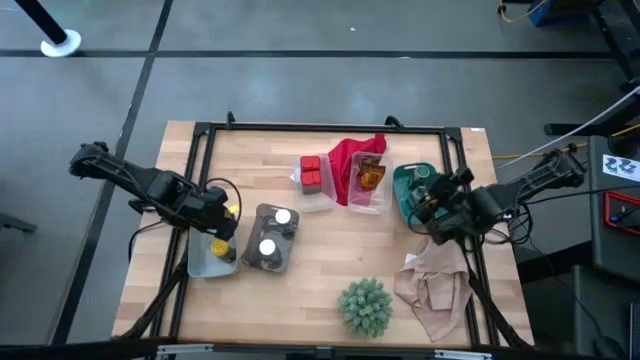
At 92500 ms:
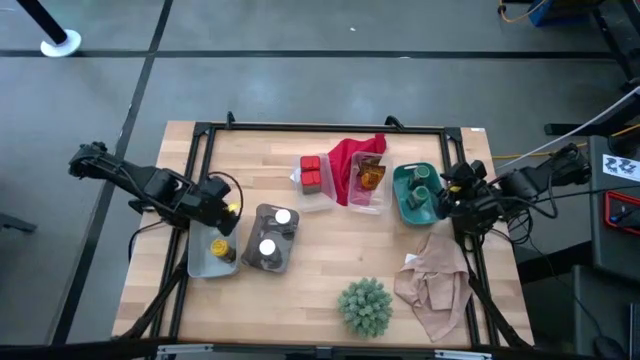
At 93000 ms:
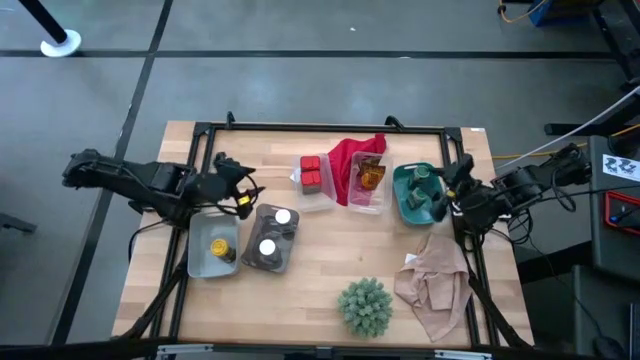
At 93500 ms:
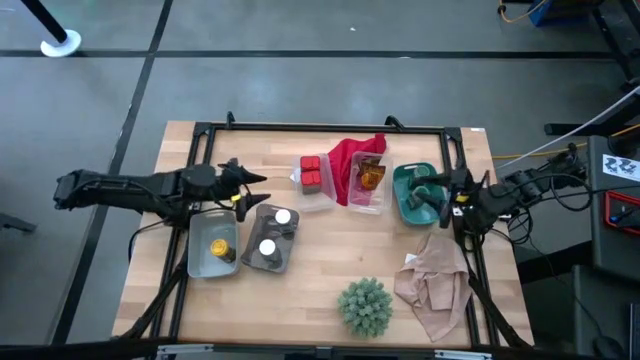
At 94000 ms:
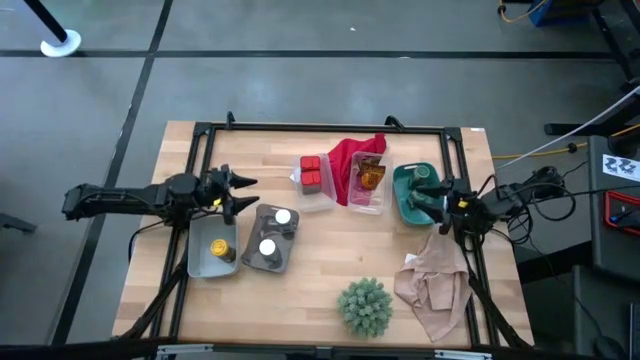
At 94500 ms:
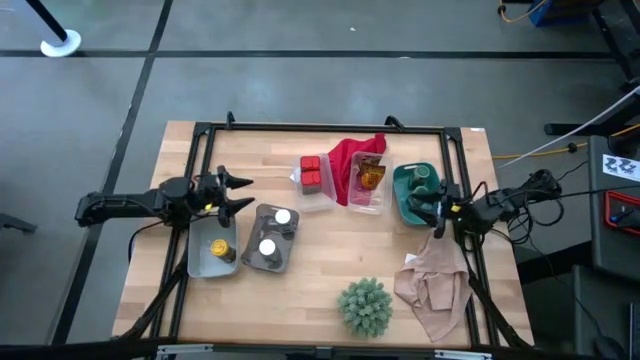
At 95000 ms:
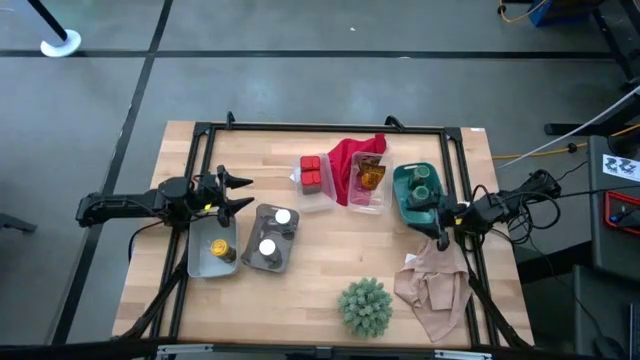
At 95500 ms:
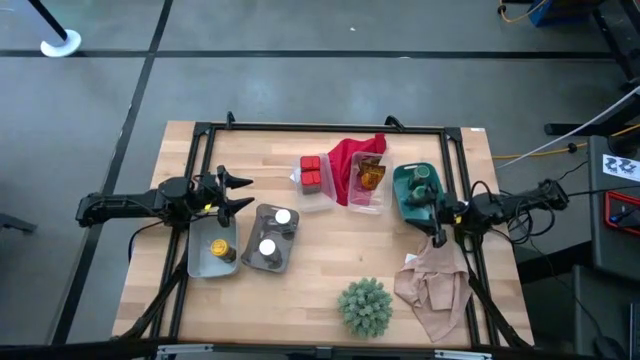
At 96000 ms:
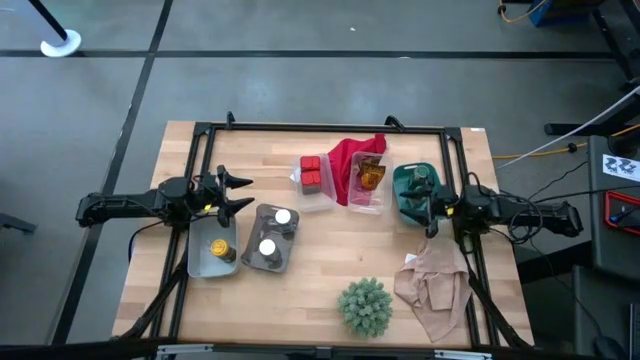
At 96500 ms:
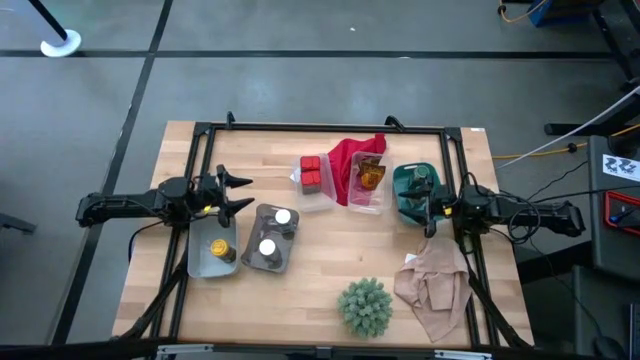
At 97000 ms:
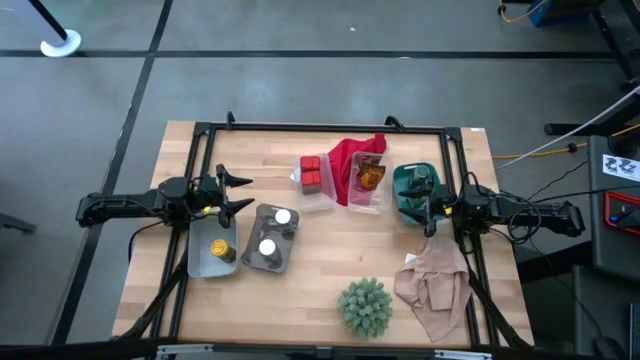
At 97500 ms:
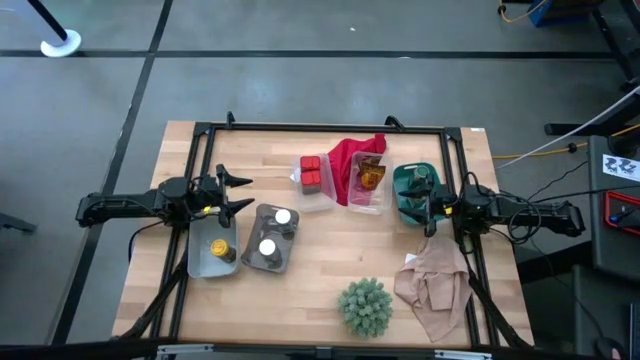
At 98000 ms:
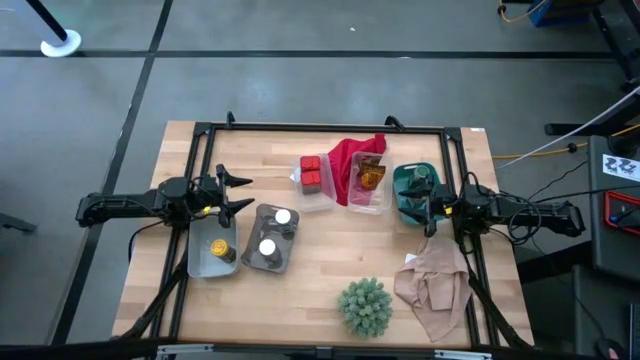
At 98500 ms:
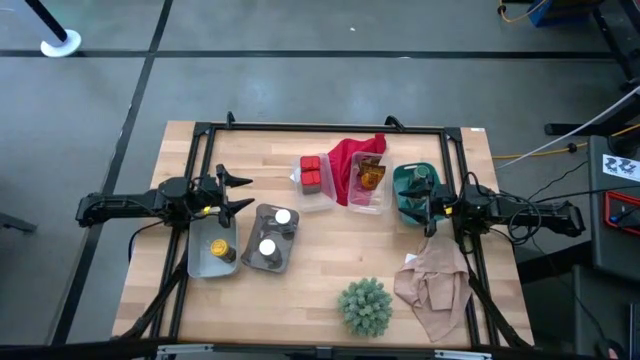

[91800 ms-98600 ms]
Task: Sort spices by type
Return to Home Position

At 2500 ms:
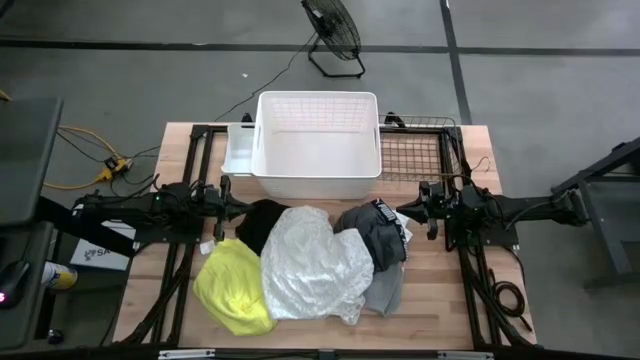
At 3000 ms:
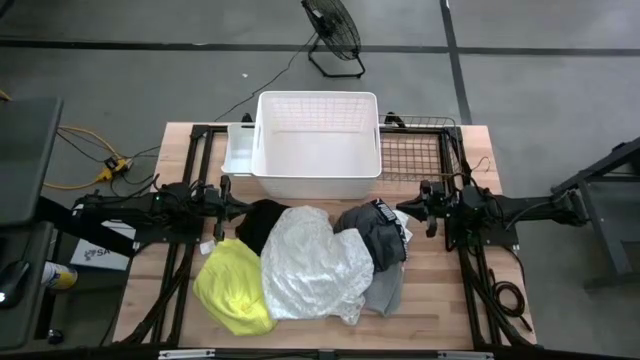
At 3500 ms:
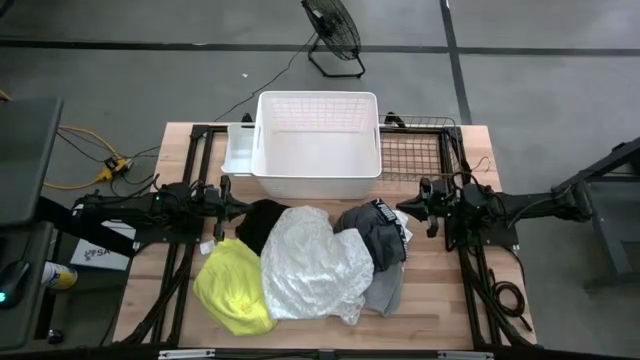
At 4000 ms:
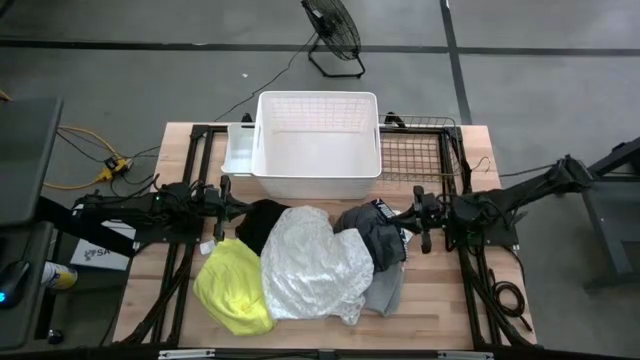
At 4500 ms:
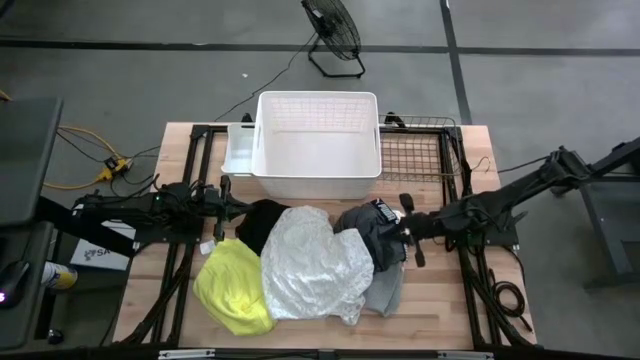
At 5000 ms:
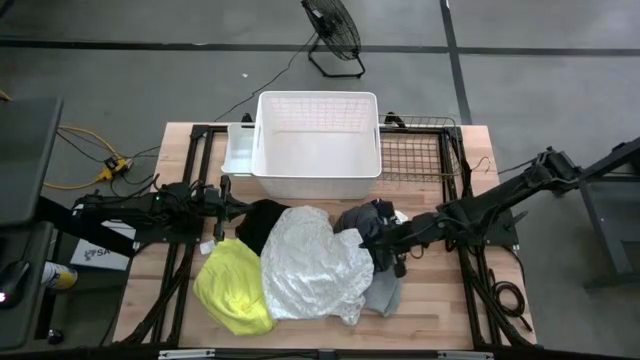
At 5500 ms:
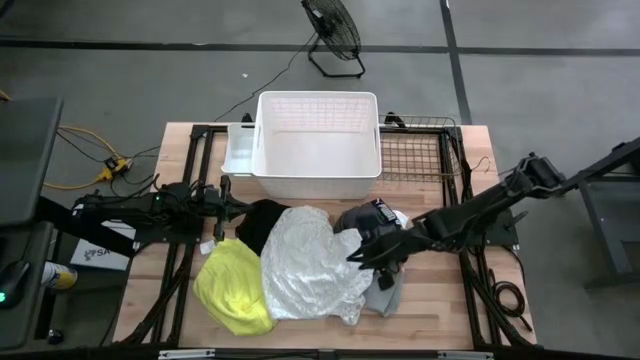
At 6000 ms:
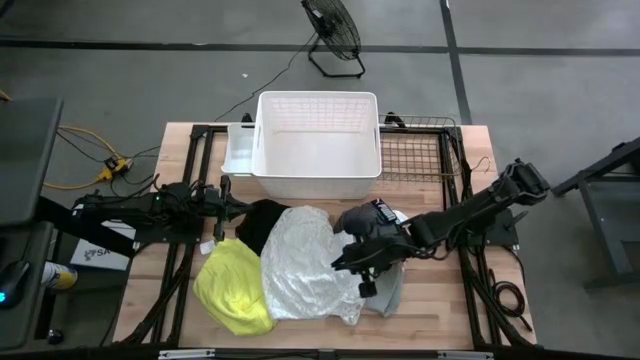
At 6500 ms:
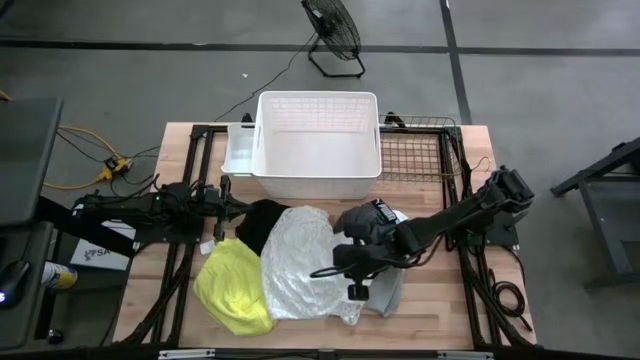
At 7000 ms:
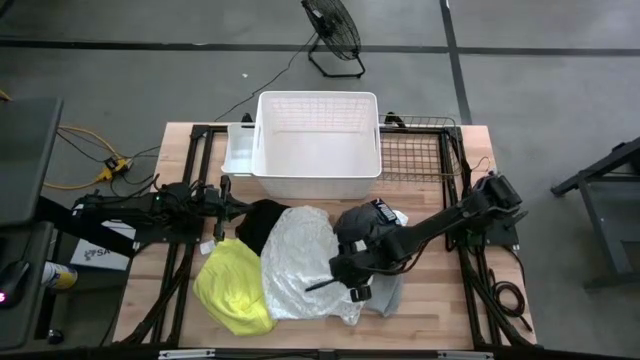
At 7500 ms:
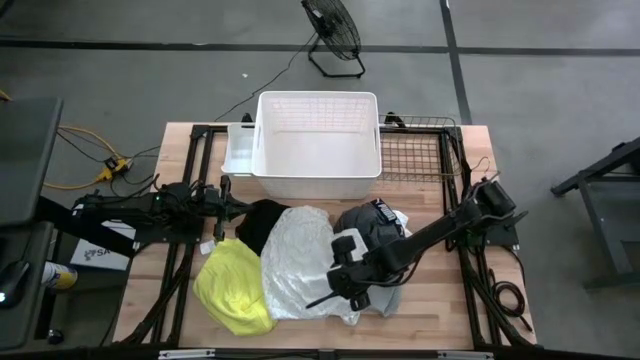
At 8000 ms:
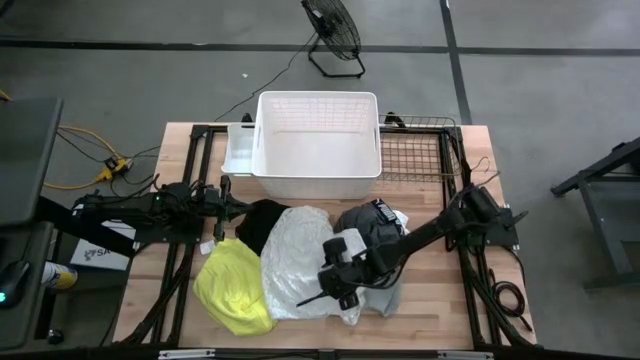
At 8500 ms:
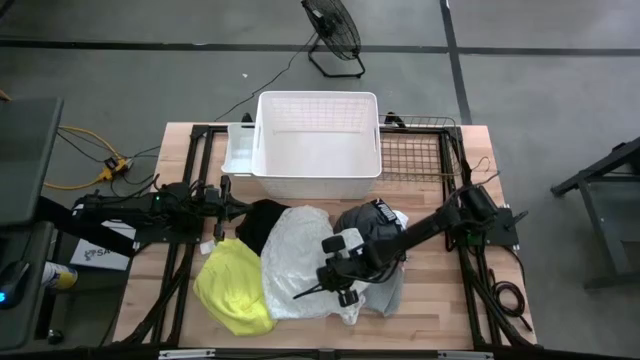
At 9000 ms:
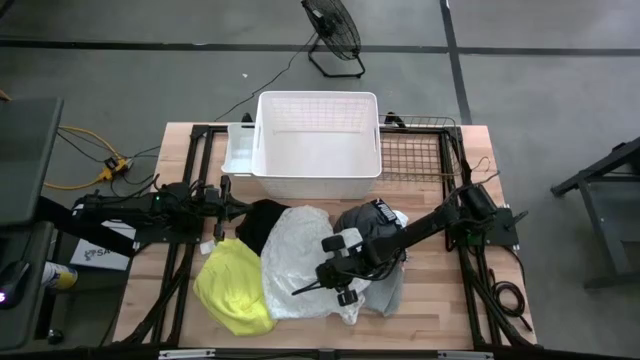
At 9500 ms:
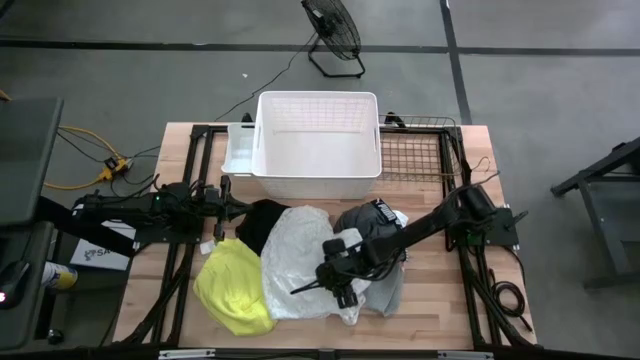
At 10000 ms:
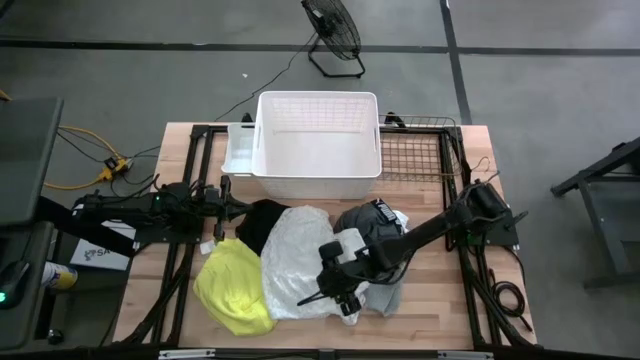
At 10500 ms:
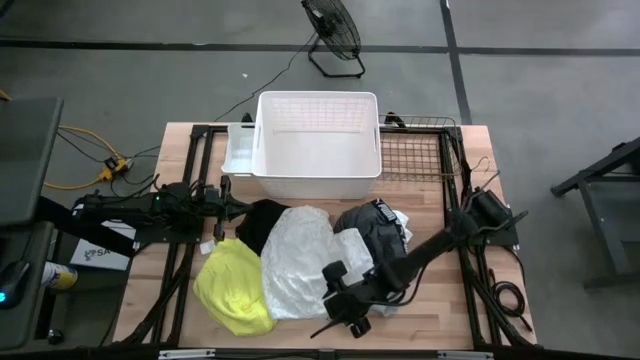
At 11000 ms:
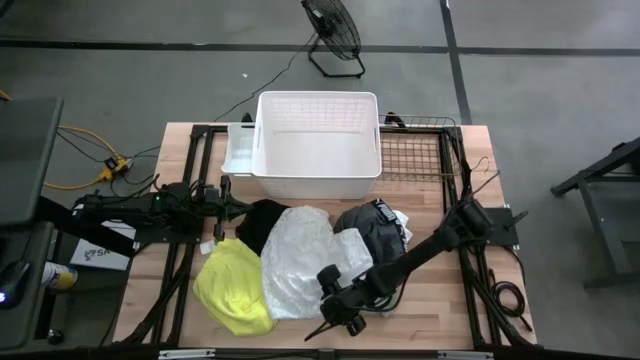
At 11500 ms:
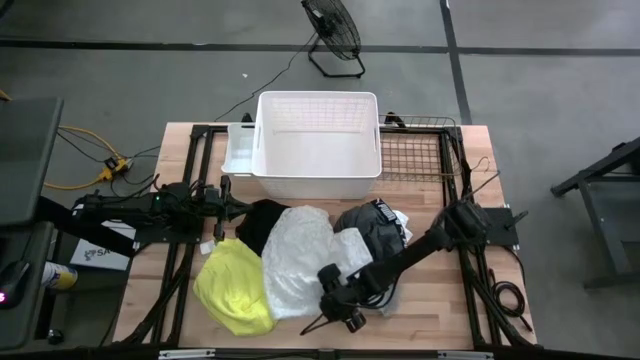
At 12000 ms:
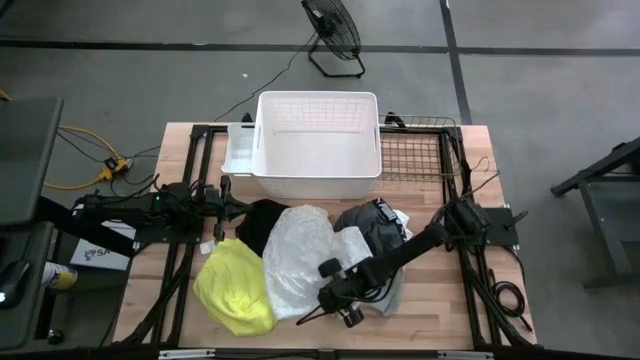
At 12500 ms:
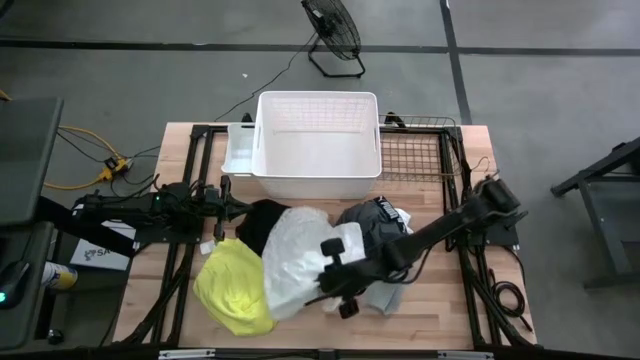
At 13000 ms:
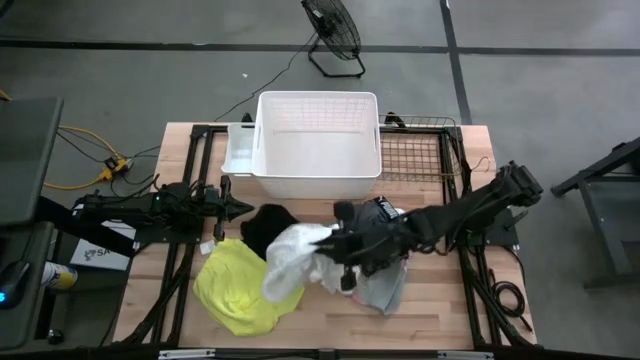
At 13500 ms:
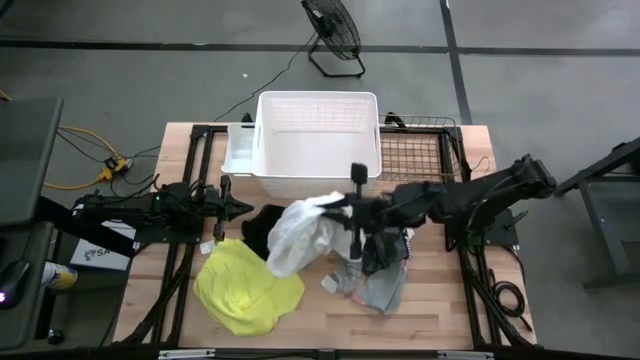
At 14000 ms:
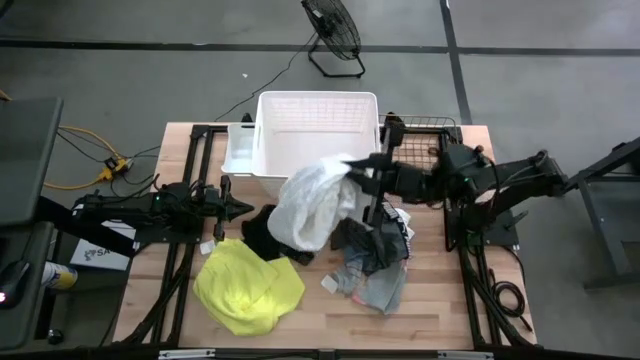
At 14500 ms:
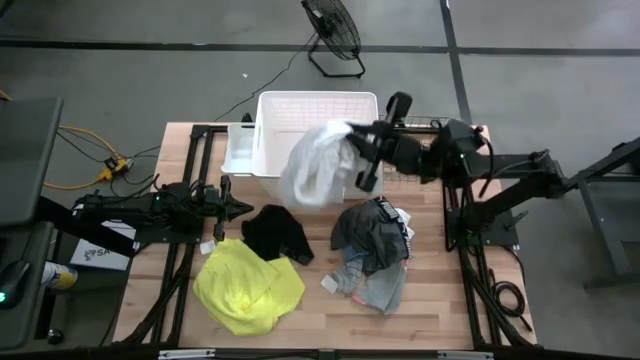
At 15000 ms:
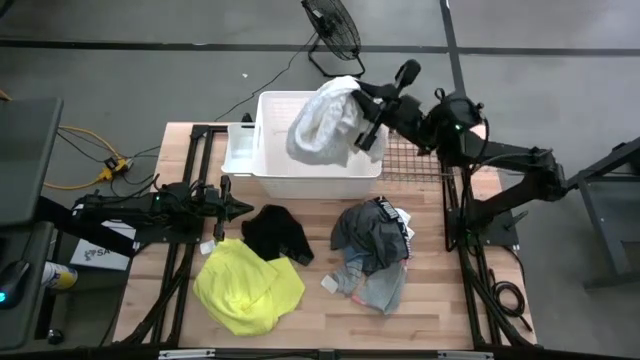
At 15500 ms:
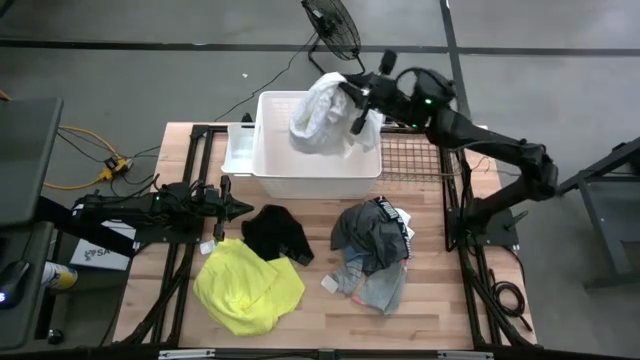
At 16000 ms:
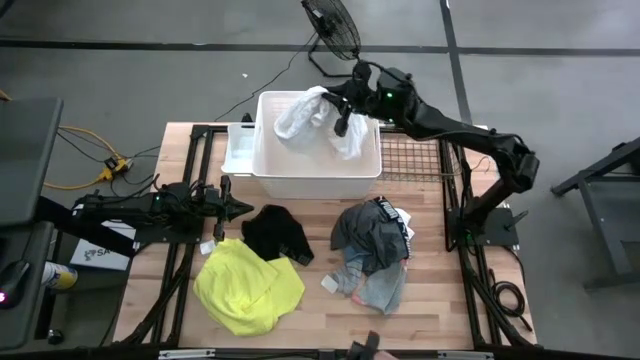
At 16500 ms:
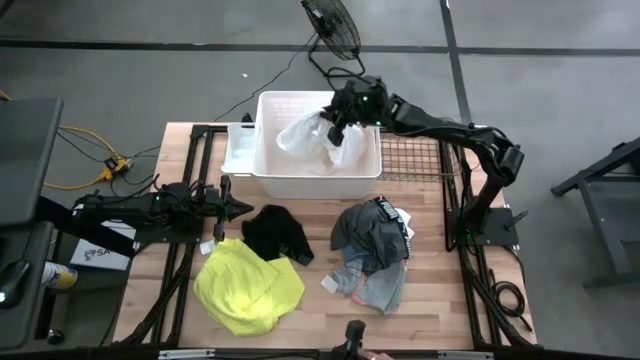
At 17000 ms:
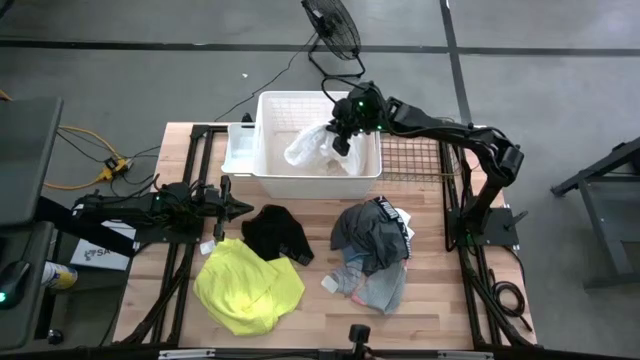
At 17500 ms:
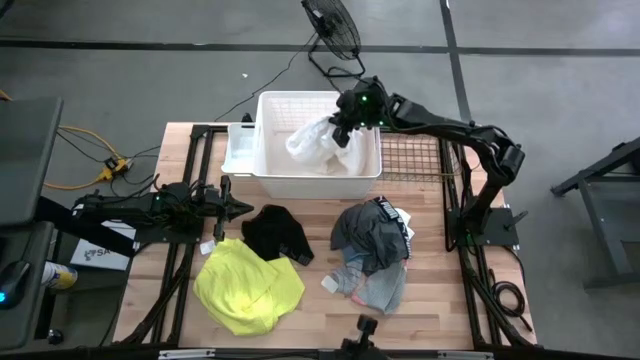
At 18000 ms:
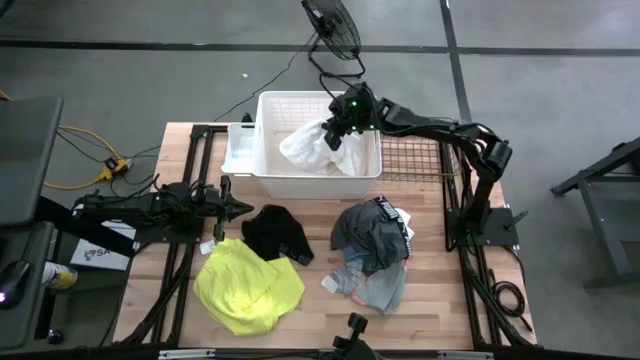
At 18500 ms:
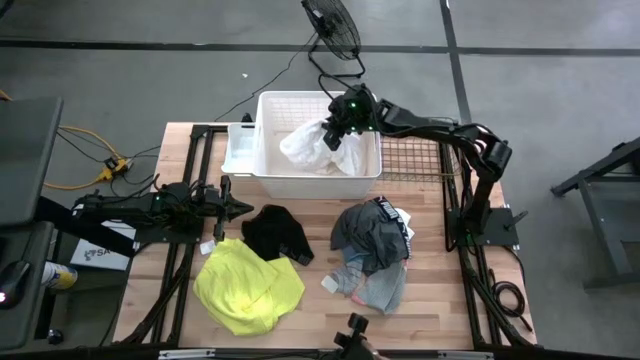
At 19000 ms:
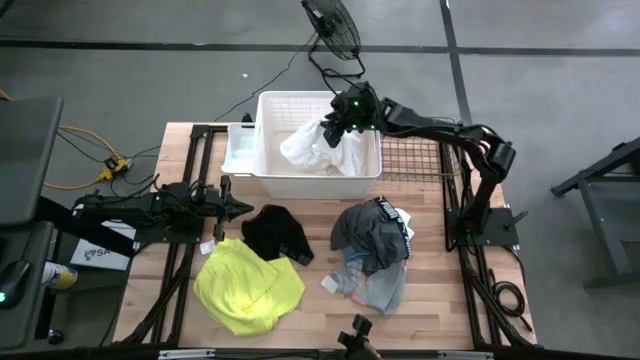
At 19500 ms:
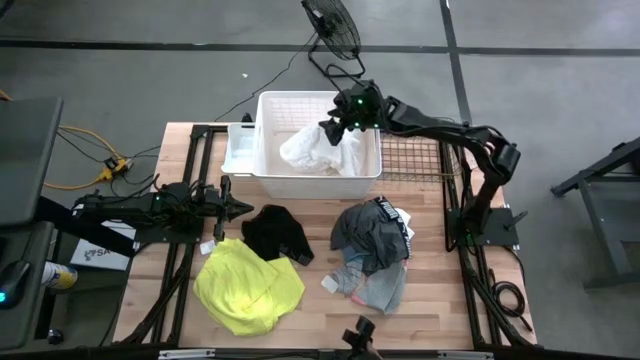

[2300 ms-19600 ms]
Task: Pick & Place Cloths
Put the white shirt into the laundry organizer
